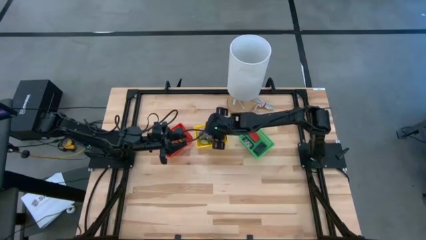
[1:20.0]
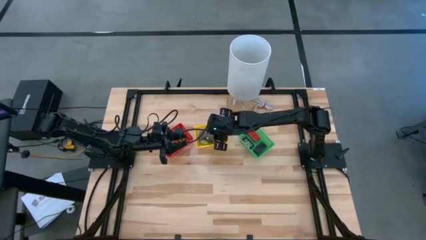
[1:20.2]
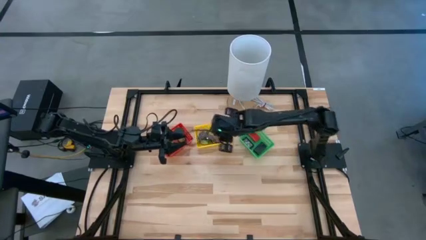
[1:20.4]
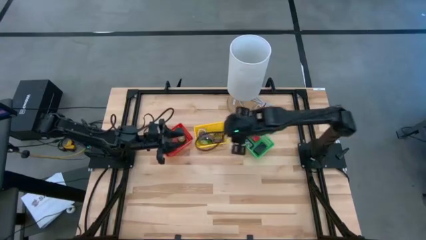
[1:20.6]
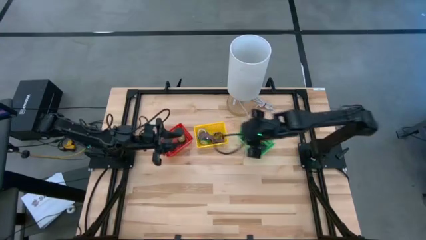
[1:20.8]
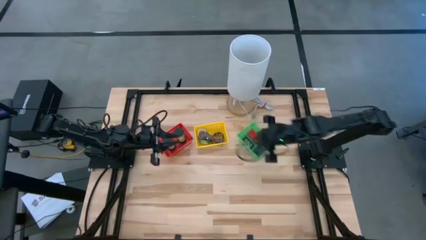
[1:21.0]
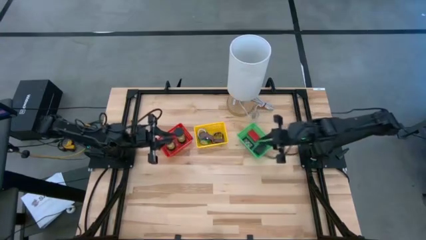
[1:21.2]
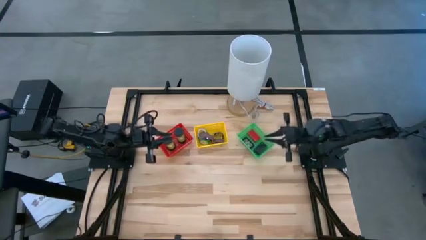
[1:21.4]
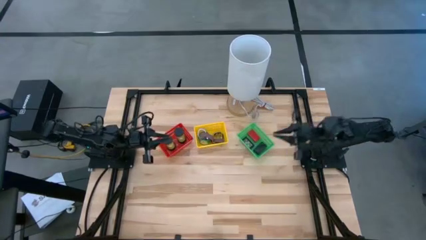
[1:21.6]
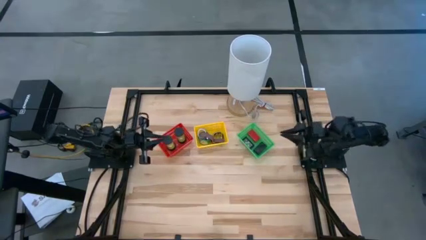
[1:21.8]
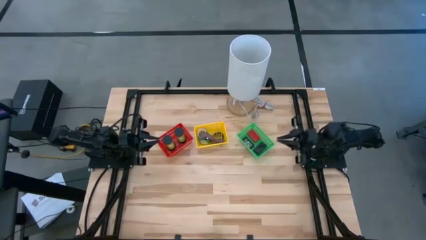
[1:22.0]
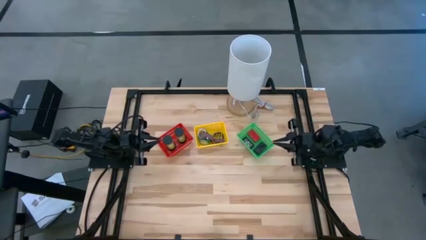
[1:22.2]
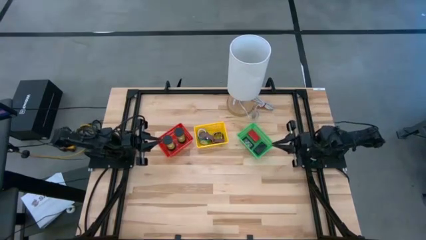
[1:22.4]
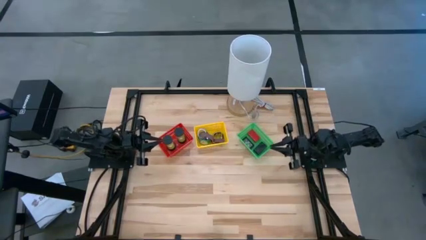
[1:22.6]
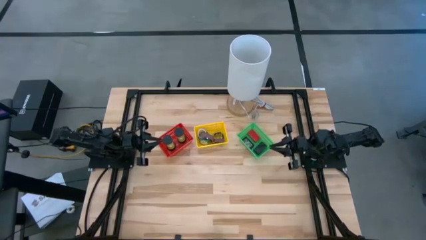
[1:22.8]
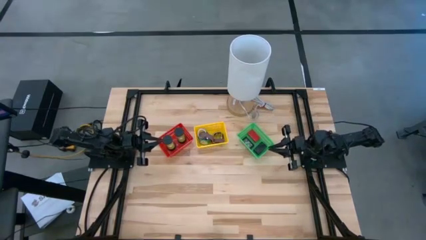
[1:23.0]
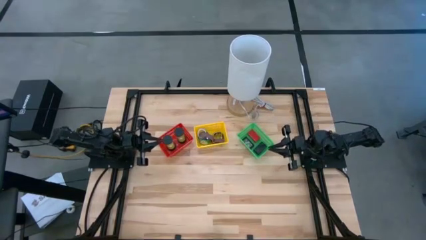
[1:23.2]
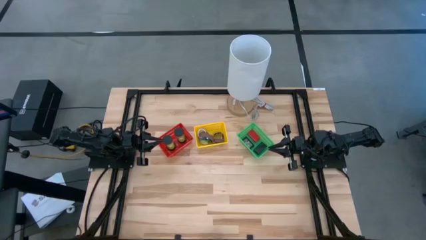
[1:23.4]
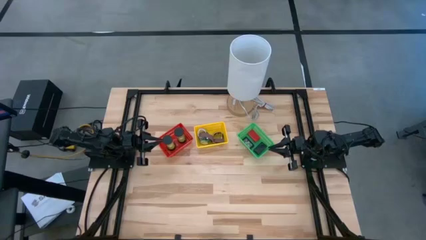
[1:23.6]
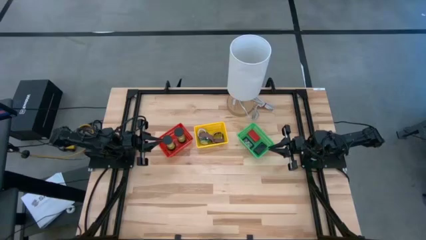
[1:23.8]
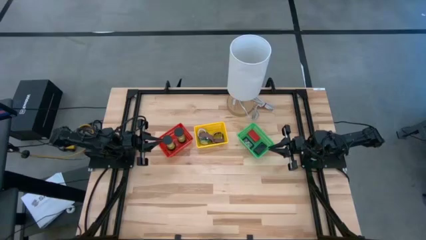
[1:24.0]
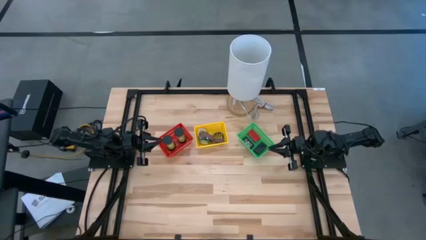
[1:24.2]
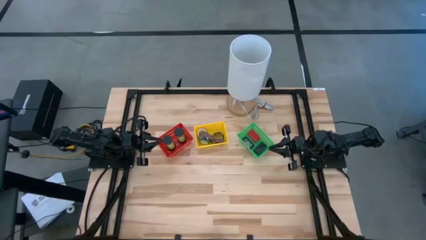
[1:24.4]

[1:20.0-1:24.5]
Task: Pick & Place Office items
Return to Home Position

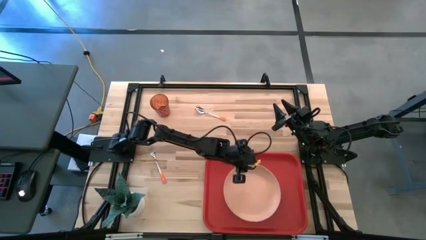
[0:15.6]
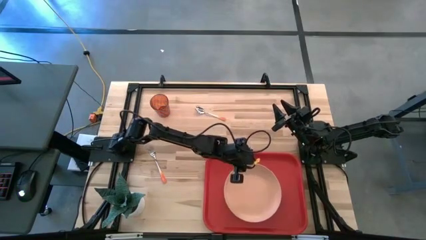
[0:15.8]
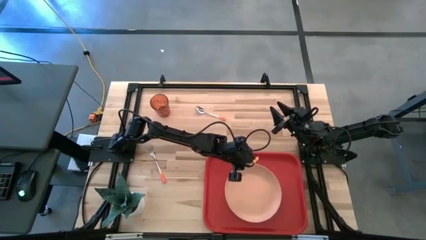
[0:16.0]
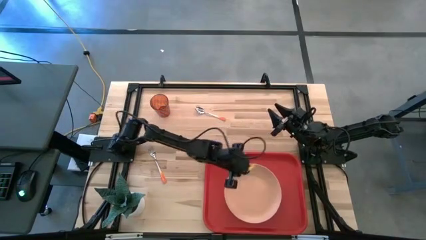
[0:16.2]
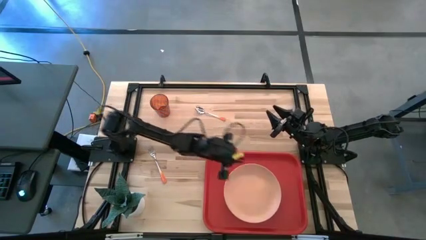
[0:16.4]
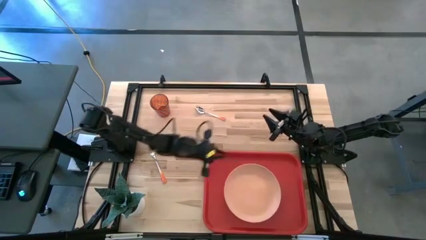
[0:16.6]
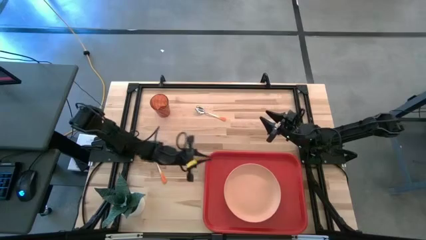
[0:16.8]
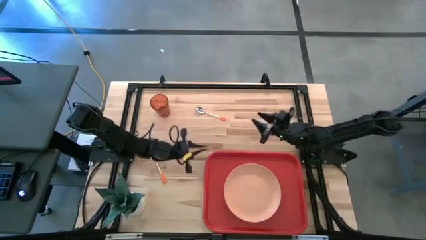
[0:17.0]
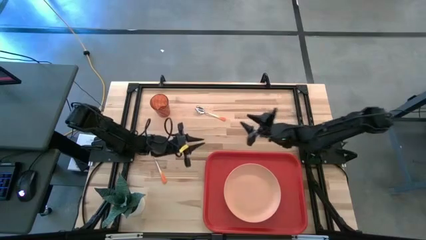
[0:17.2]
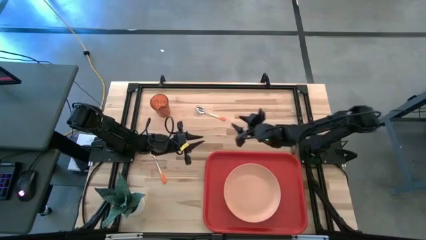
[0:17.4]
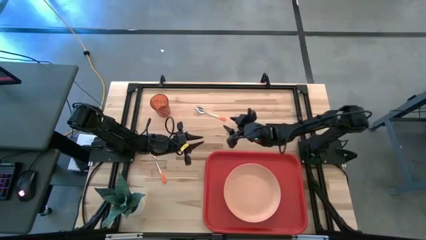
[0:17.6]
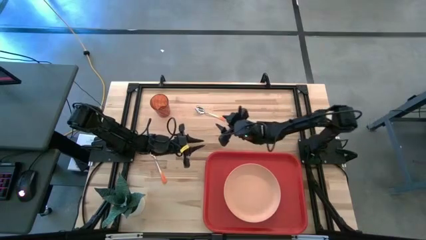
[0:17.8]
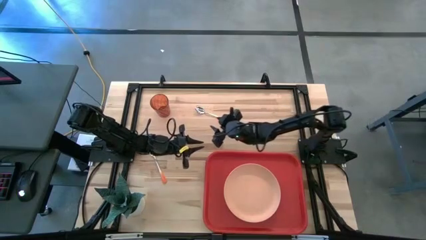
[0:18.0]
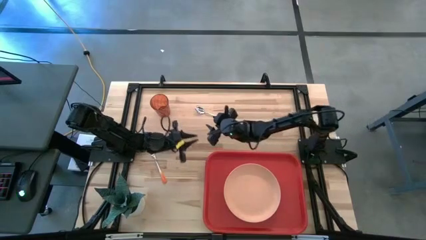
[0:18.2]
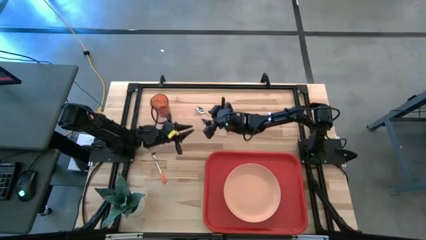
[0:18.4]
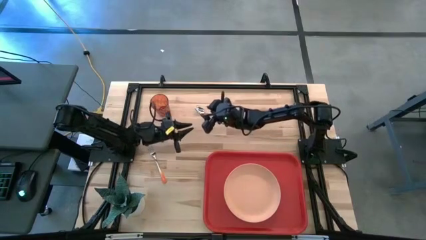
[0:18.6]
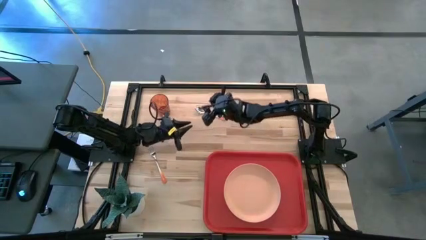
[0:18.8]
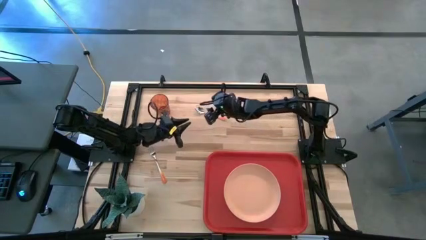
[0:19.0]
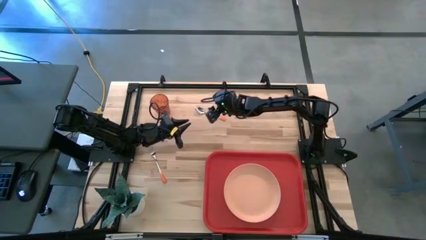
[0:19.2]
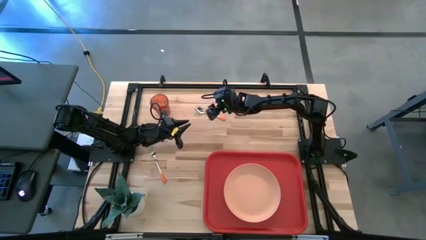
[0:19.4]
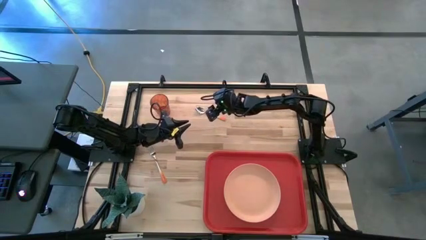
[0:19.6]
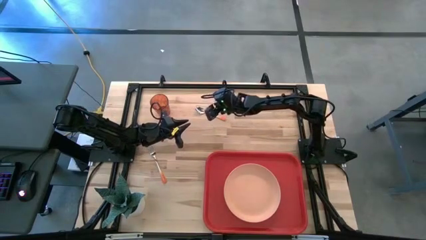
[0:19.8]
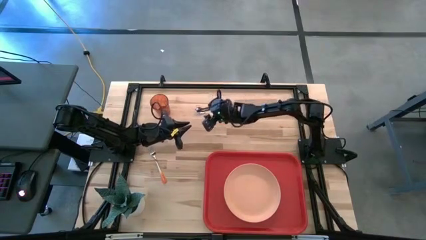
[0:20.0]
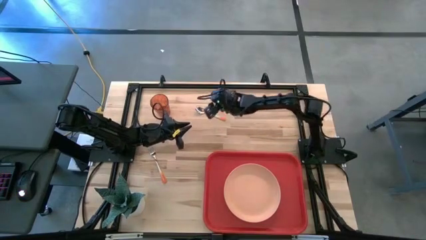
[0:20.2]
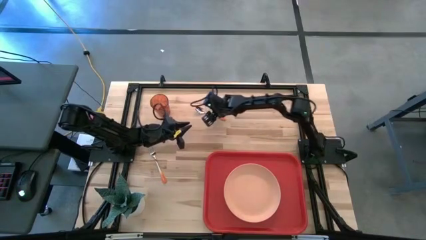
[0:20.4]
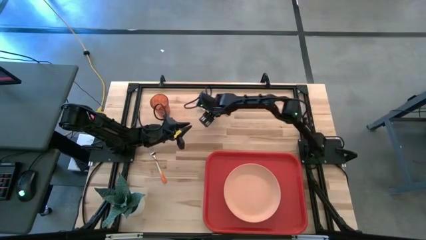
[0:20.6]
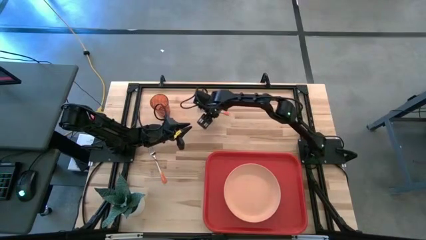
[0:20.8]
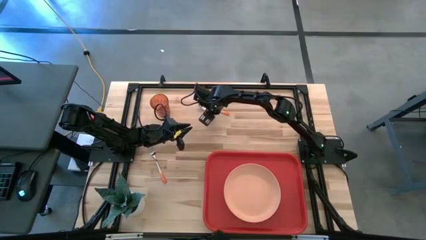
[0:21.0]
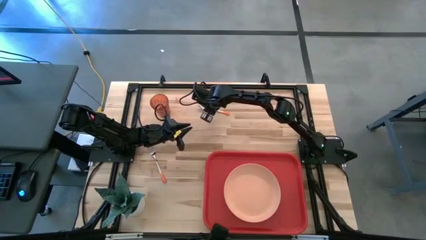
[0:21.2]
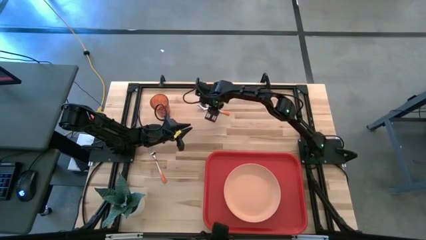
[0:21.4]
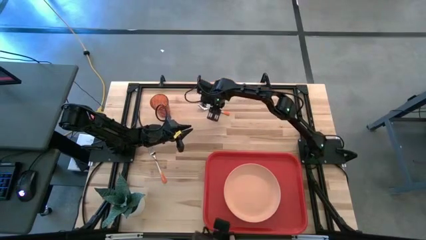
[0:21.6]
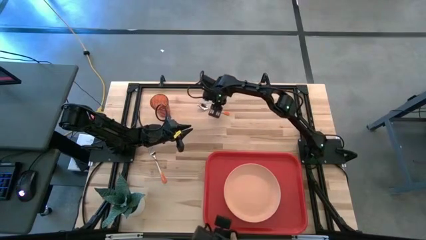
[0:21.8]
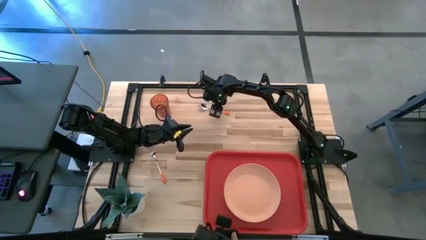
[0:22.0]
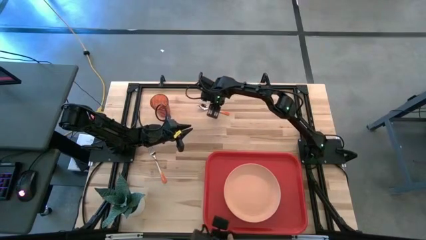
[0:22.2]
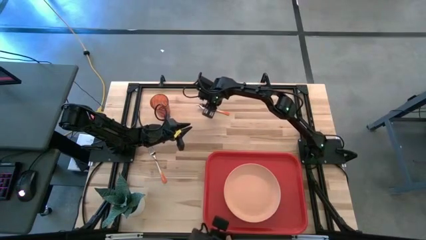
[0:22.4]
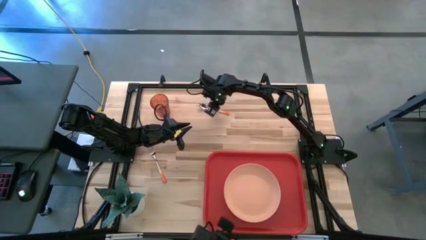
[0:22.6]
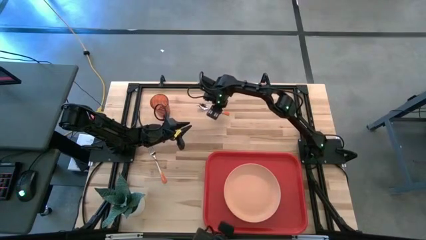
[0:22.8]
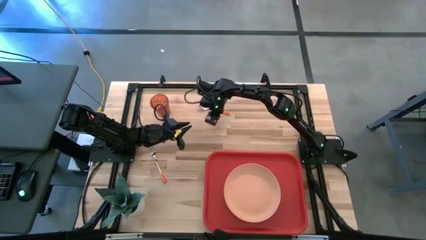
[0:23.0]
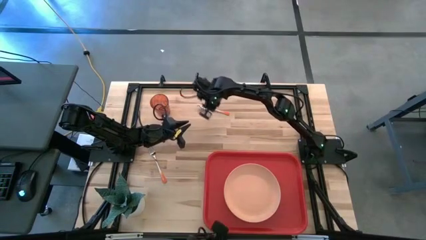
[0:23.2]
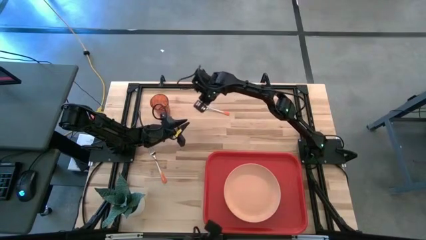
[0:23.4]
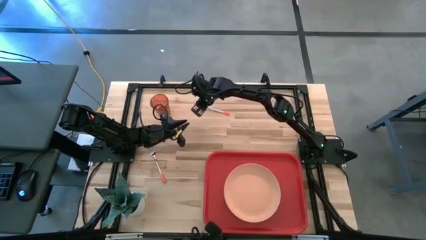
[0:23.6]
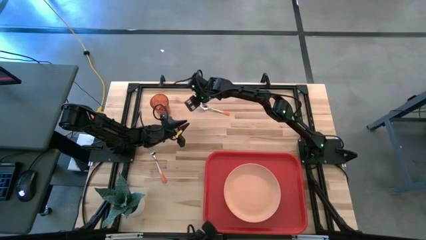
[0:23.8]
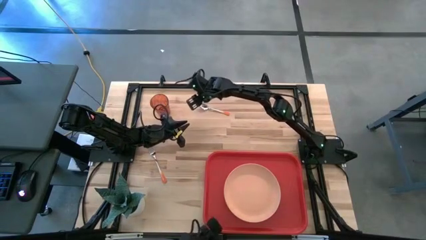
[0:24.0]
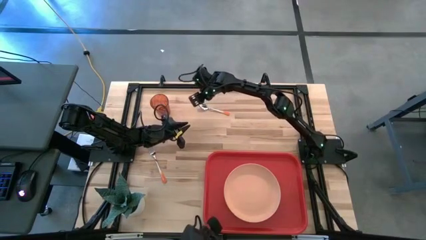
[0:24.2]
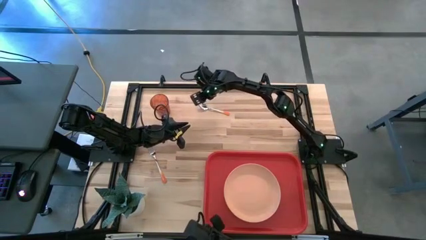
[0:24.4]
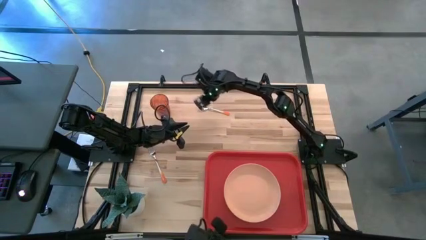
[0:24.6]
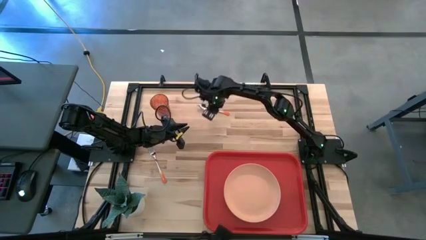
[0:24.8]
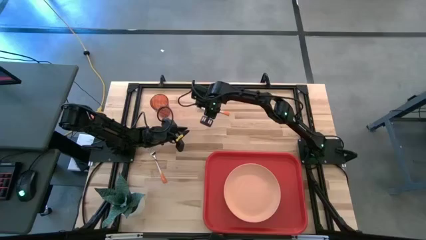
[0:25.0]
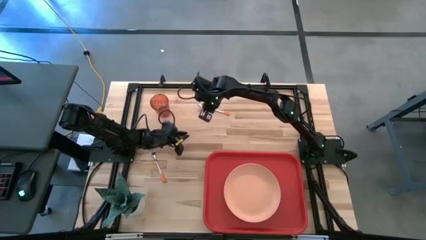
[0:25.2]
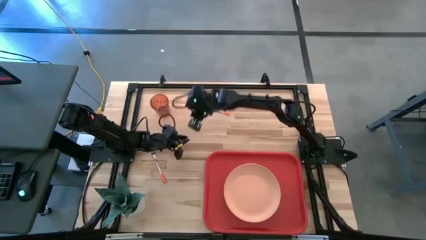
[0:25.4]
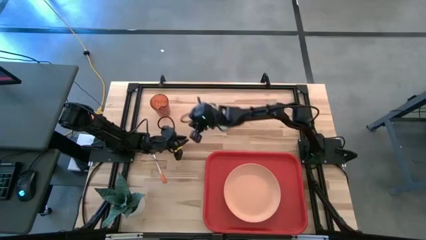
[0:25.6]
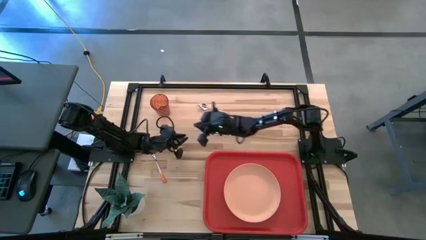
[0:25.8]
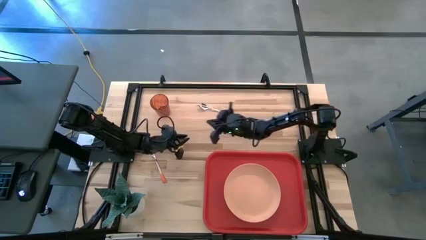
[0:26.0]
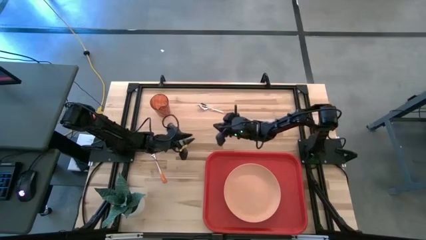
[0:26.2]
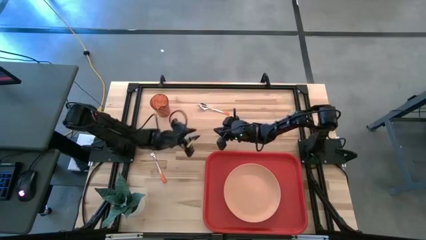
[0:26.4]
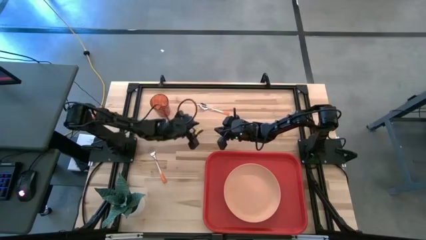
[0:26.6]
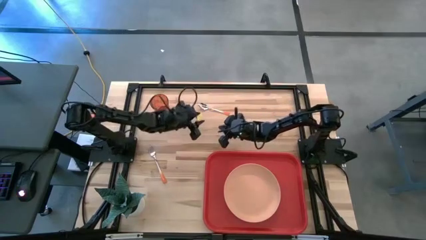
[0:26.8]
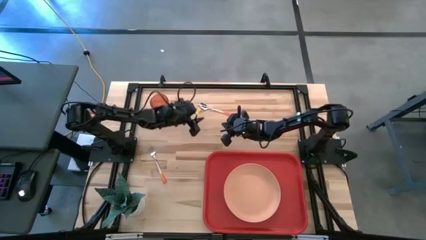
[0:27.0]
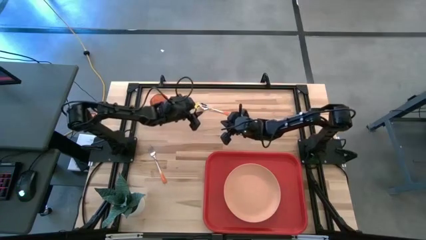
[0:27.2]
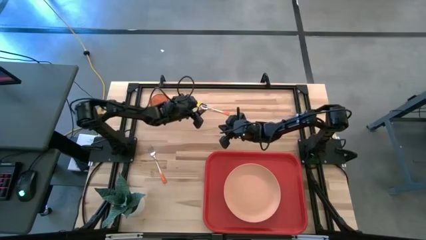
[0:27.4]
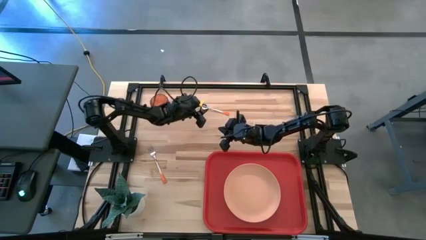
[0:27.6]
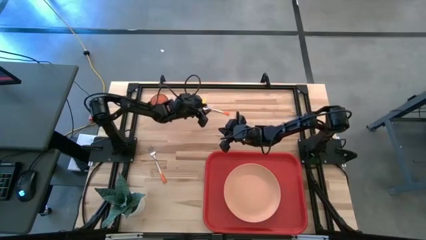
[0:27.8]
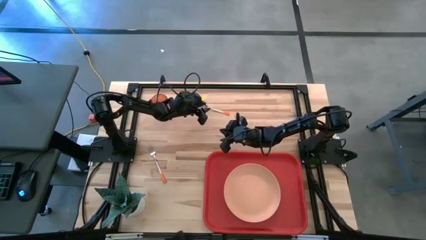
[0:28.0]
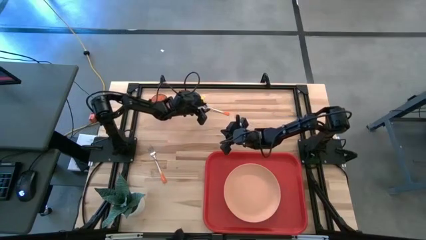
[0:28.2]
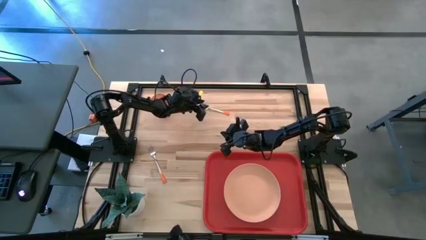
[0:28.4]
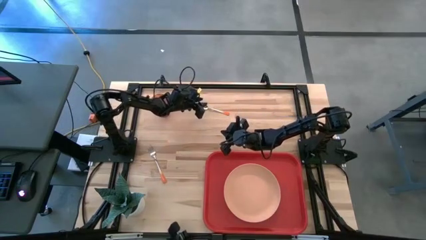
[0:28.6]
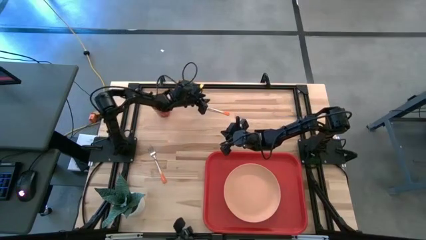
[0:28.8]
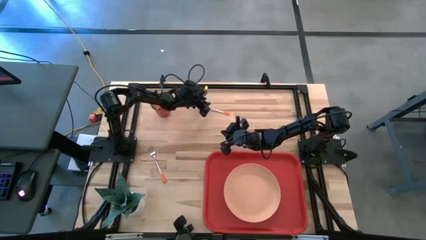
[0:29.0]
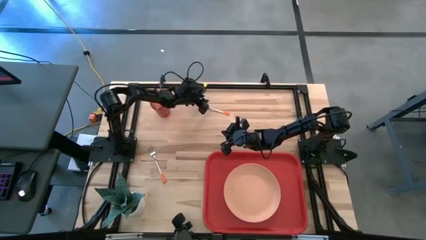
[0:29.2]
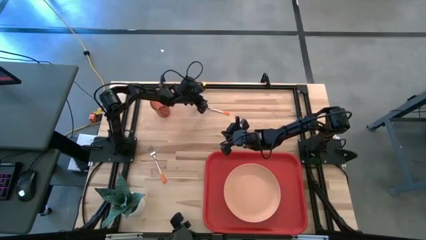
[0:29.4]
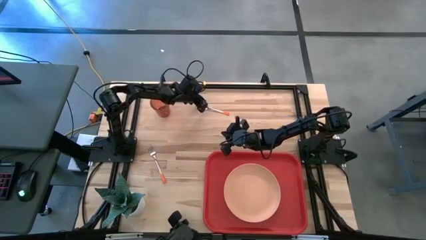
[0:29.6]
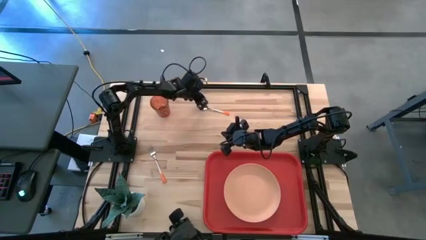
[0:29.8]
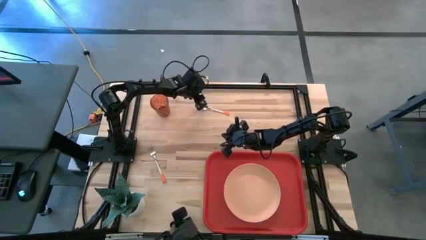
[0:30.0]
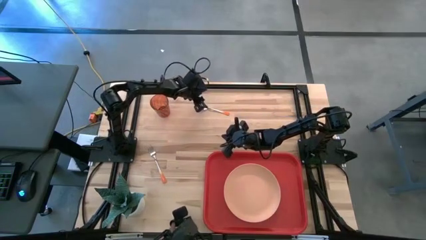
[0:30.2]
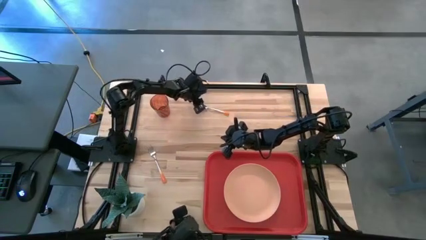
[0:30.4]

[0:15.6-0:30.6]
Task: Pick and place plate/cup/fork/spoon on tray
Put the orange spoon on the red tray to the left of the orange plate
